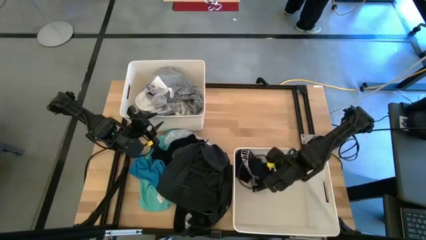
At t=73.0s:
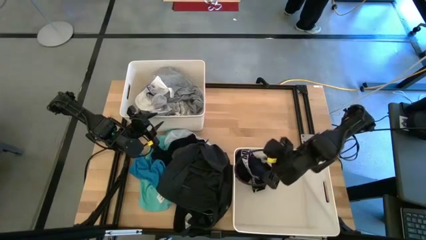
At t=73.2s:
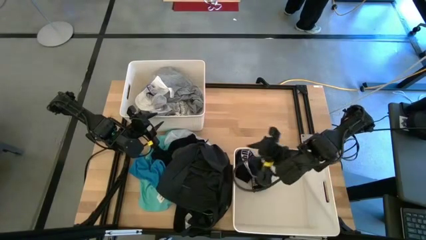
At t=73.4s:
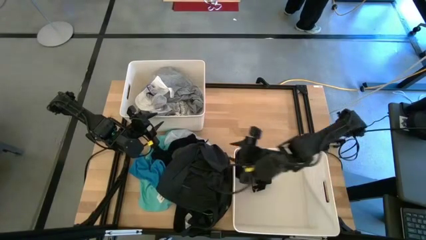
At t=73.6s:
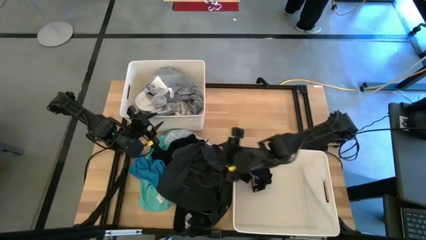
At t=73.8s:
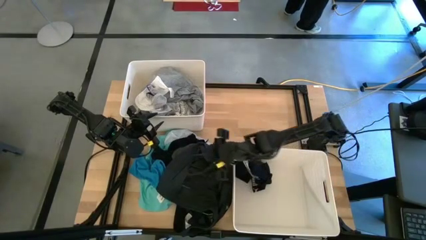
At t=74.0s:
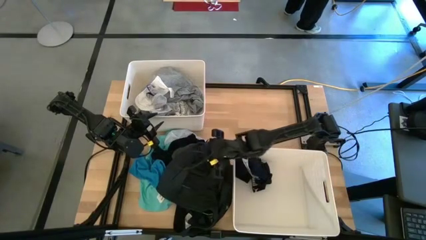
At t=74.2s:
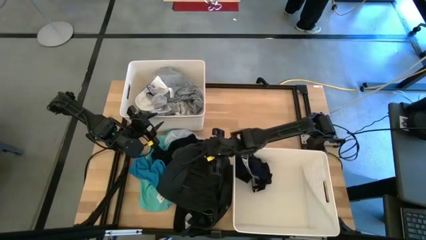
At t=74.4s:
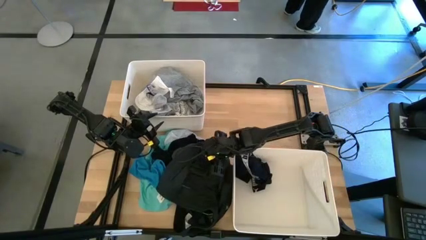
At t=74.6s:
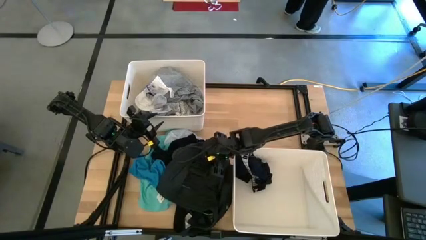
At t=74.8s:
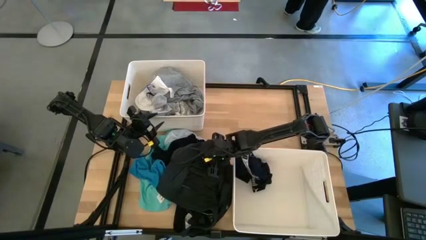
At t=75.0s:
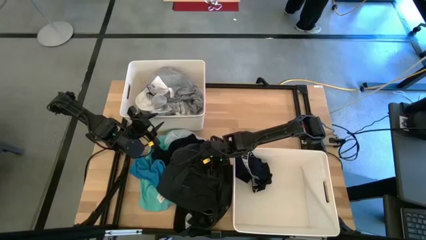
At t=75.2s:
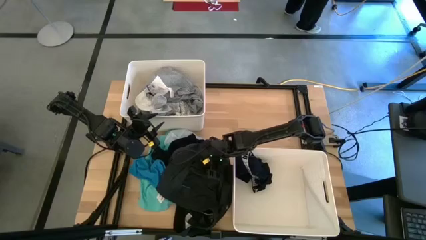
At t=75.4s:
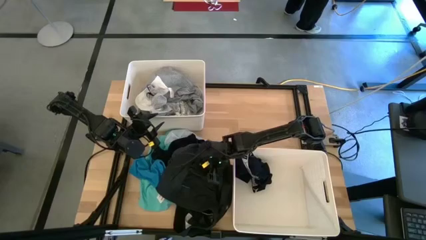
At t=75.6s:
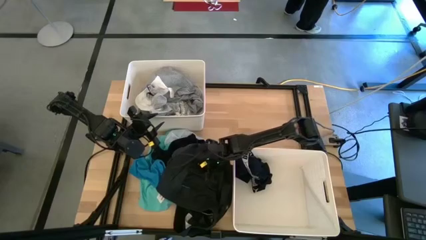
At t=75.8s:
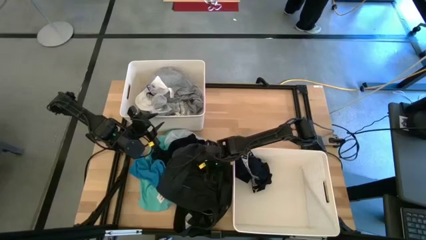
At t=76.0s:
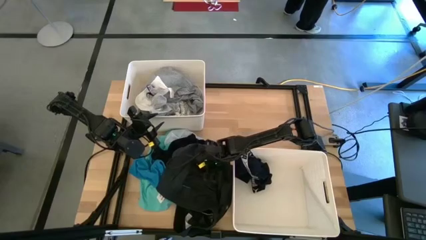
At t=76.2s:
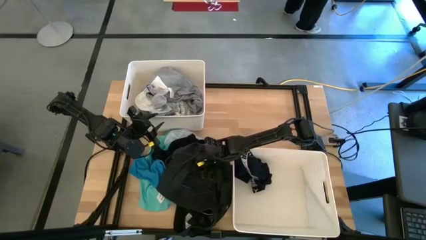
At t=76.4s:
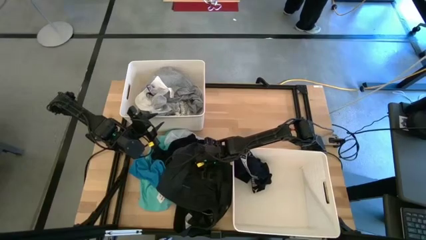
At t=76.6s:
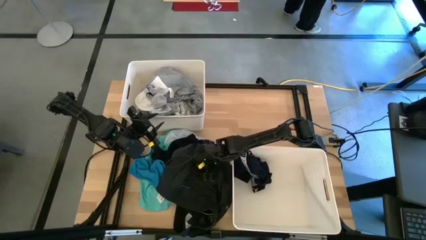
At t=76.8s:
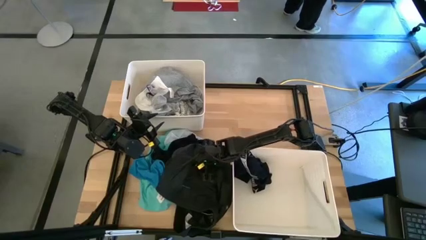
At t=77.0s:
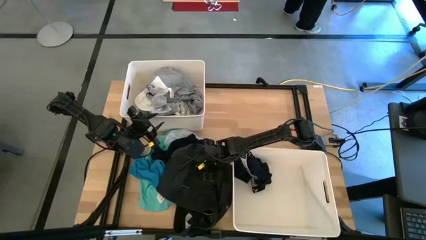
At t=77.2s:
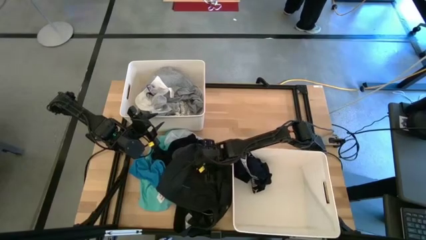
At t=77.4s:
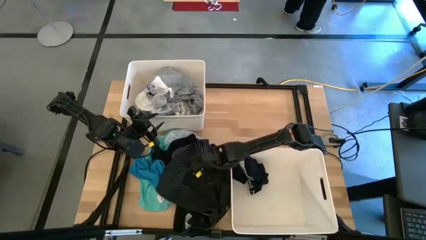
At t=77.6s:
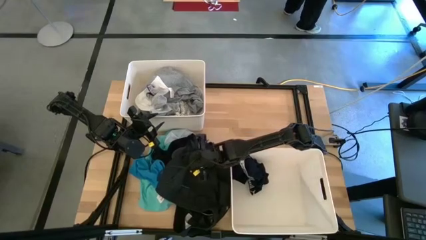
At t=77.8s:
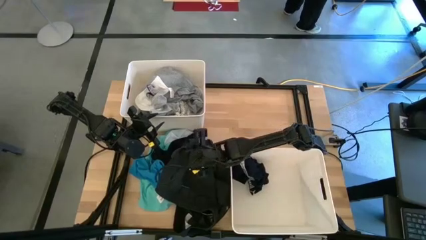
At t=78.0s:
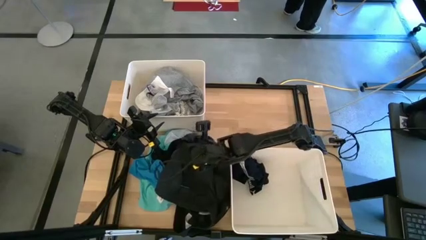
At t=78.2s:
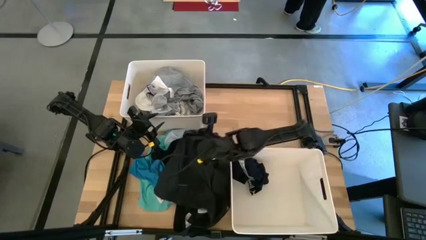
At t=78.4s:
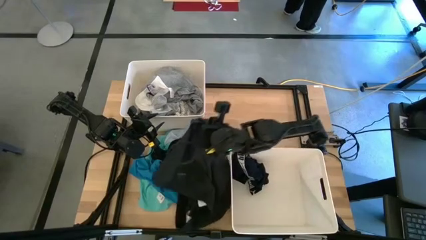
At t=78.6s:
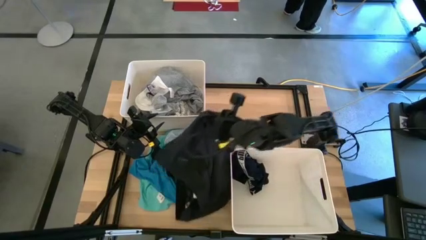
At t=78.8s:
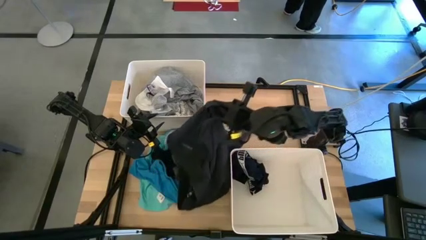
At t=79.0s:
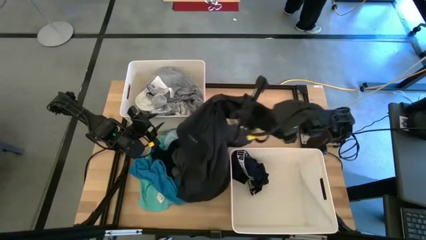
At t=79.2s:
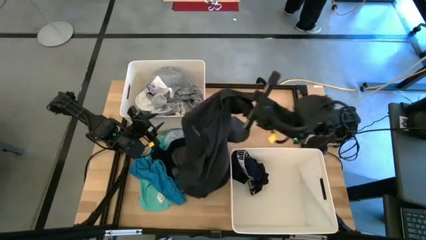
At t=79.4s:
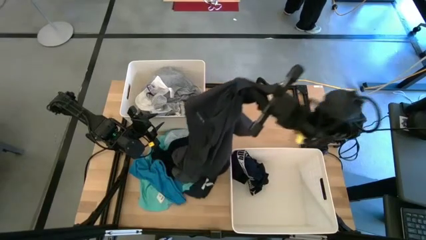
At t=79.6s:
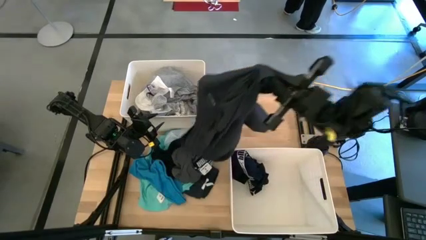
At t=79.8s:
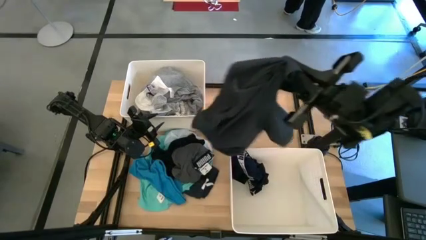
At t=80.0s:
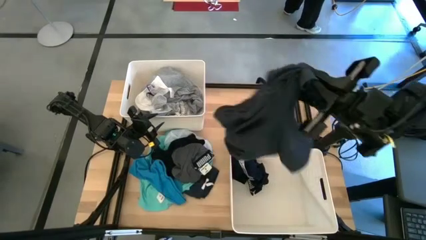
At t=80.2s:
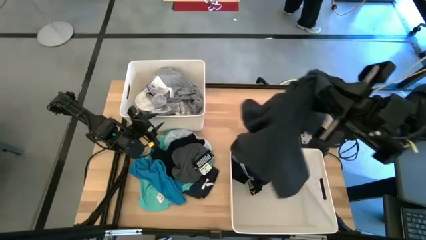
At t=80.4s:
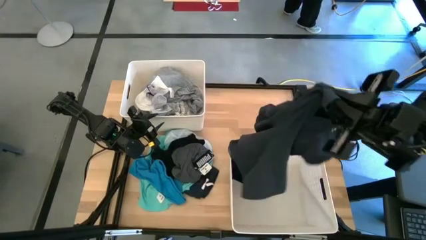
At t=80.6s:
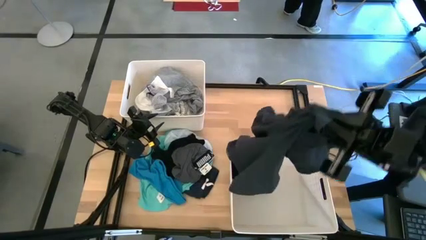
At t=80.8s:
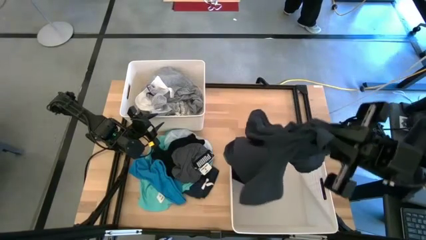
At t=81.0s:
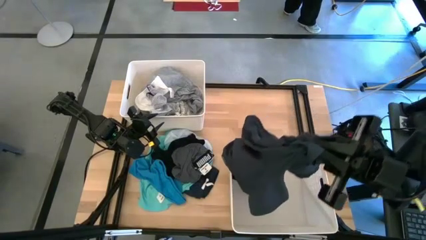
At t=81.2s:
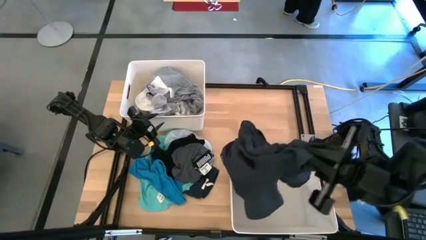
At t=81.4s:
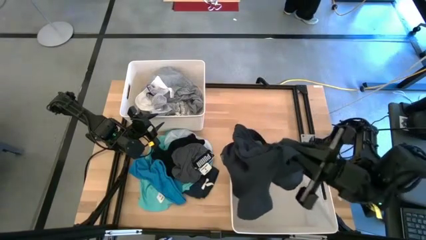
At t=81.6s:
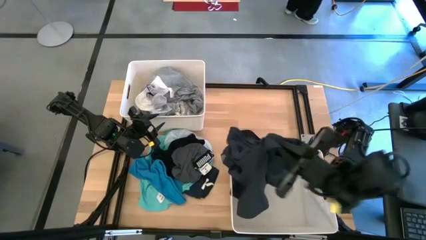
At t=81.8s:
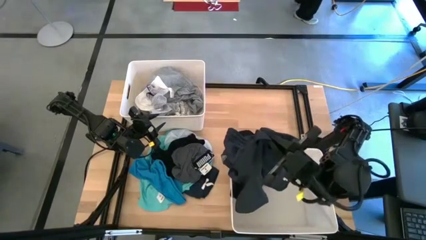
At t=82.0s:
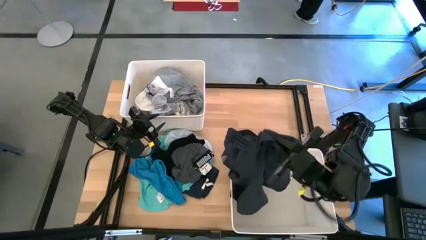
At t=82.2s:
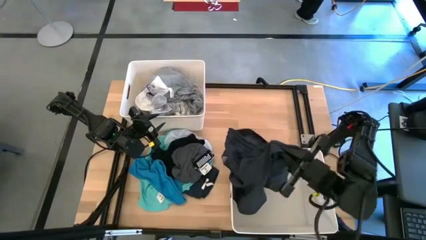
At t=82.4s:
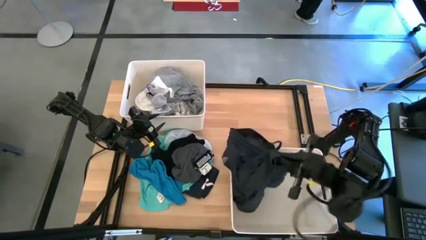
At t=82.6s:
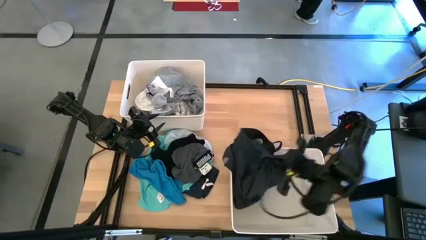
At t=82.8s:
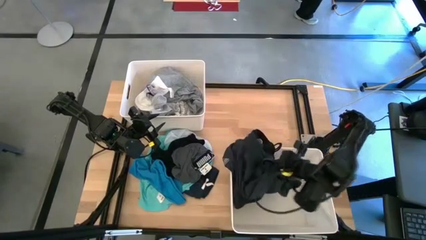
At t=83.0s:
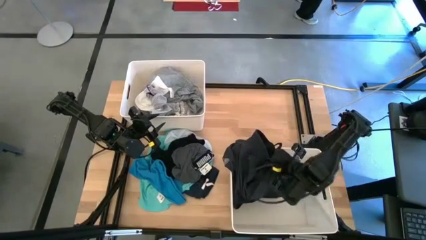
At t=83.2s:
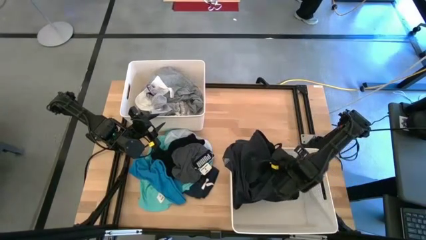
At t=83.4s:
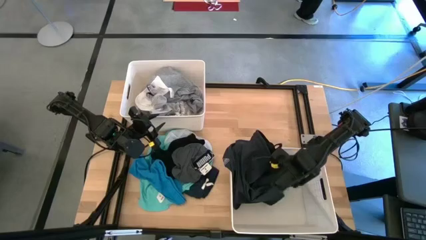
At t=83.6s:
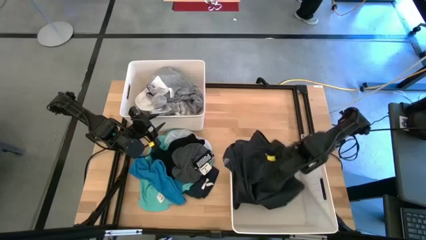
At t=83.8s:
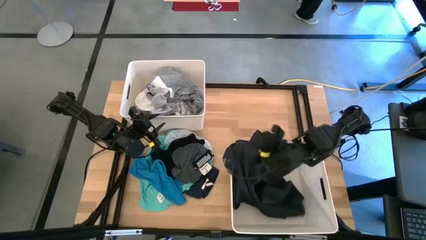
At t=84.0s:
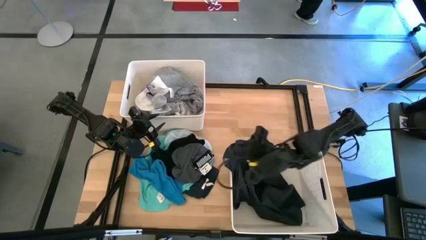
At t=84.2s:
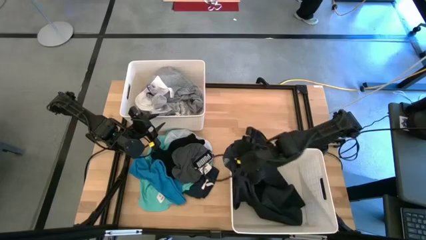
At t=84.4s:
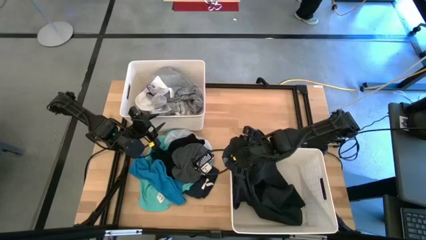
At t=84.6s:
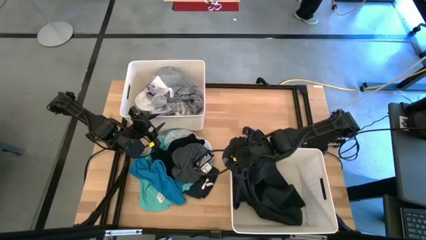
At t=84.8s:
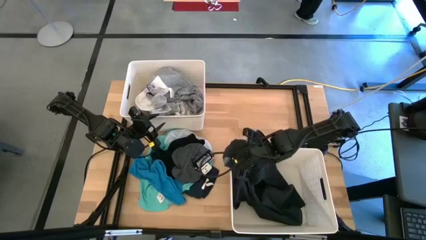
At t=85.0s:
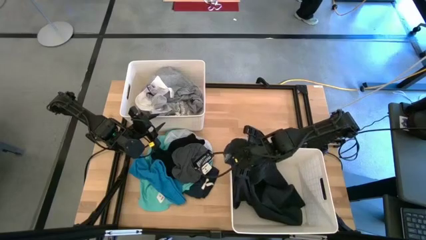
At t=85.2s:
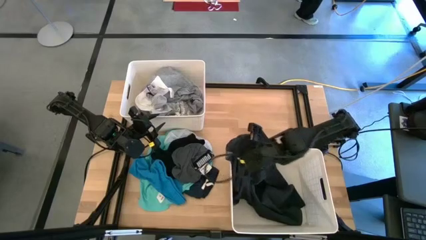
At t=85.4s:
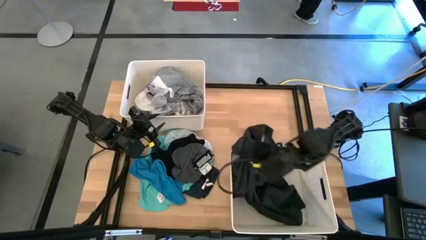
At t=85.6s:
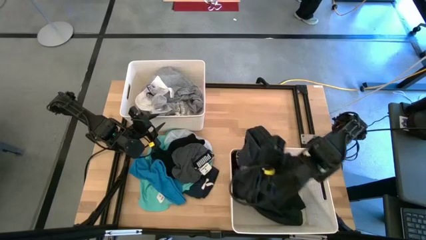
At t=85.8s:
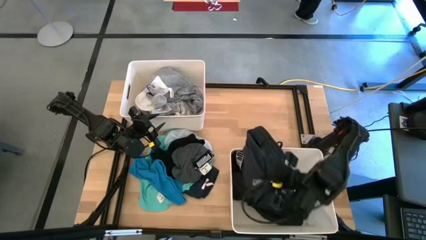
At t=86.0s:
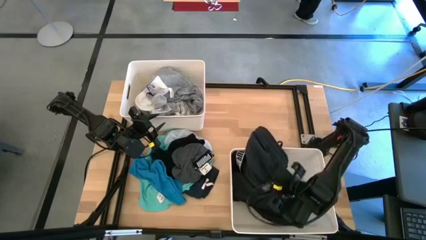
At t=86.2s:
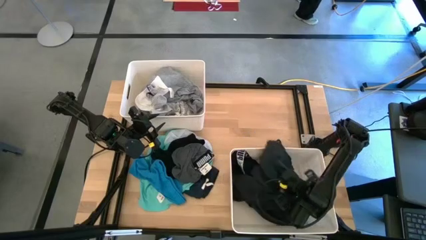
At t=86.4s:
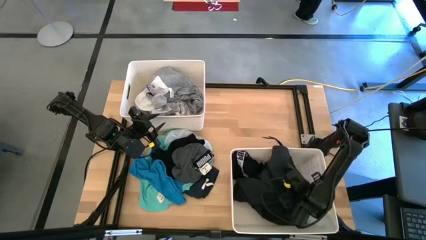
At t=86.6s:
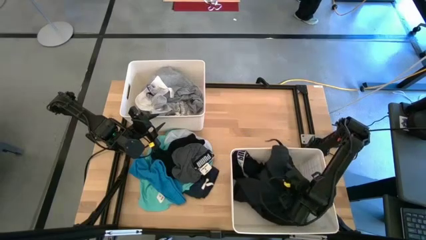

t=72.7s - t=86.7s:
Task: Sort clothes
Put the grey shorts into the bottom right laundry bin
